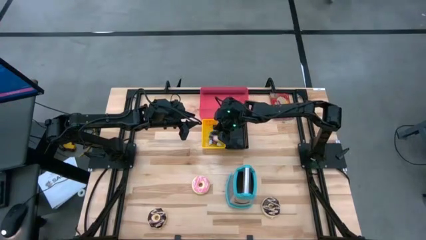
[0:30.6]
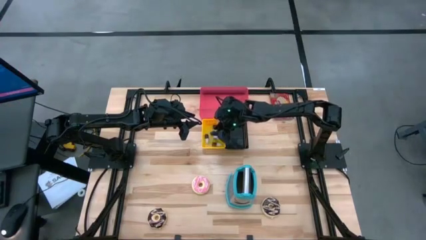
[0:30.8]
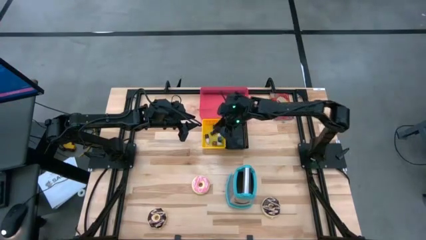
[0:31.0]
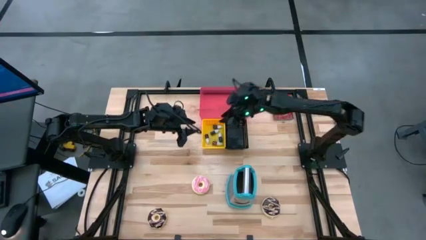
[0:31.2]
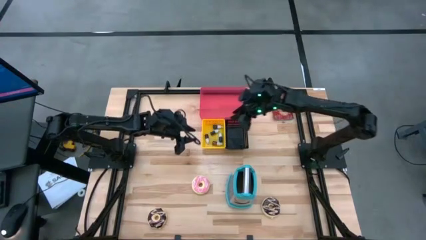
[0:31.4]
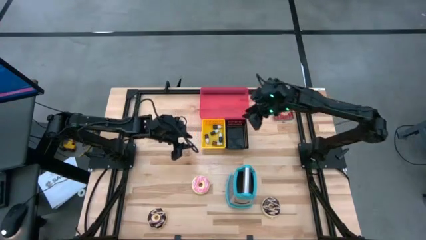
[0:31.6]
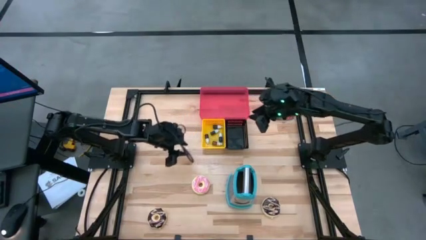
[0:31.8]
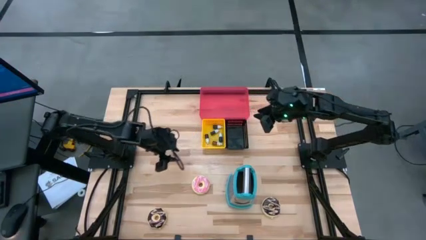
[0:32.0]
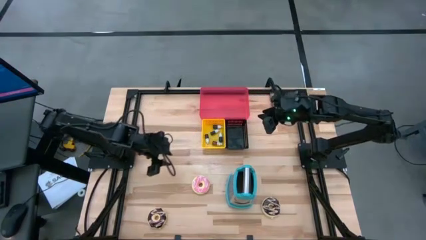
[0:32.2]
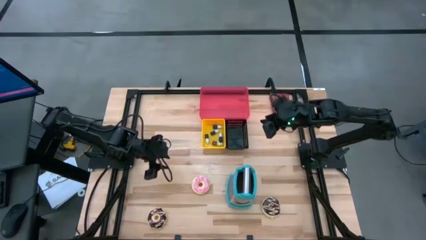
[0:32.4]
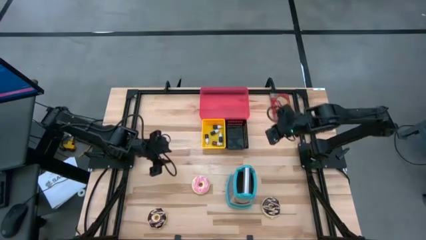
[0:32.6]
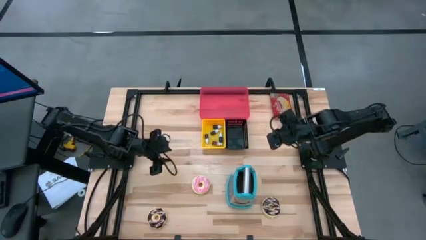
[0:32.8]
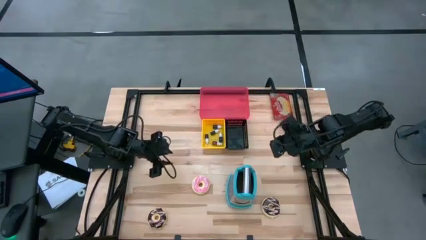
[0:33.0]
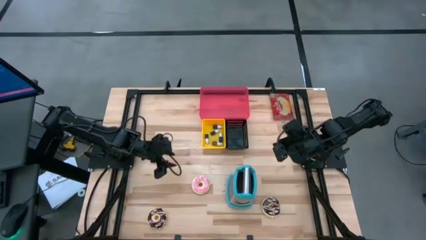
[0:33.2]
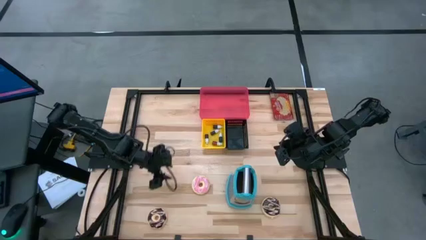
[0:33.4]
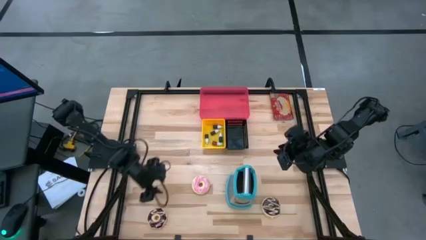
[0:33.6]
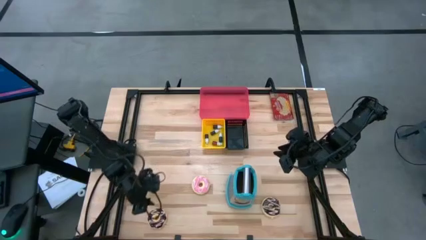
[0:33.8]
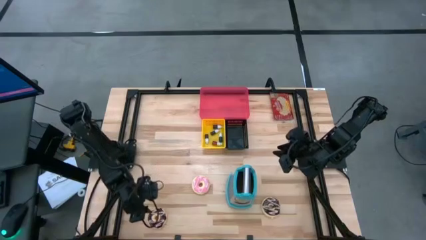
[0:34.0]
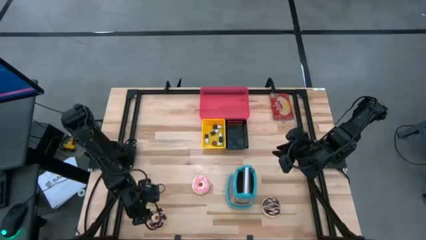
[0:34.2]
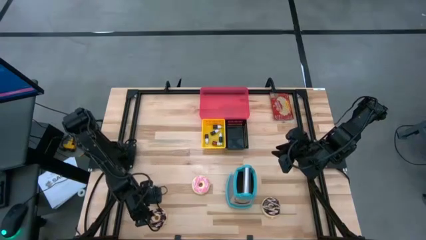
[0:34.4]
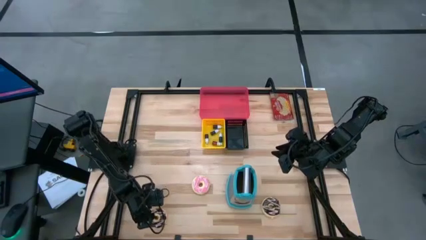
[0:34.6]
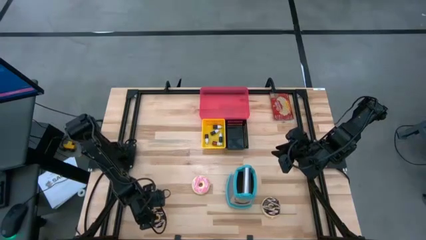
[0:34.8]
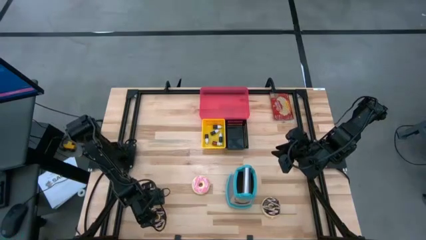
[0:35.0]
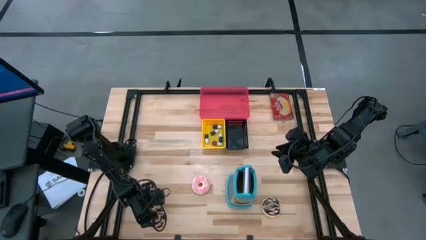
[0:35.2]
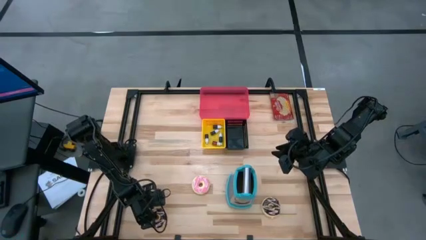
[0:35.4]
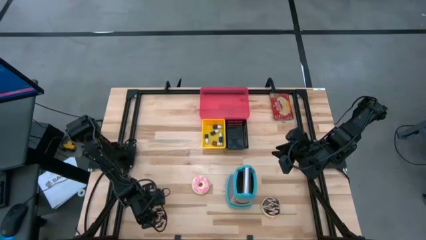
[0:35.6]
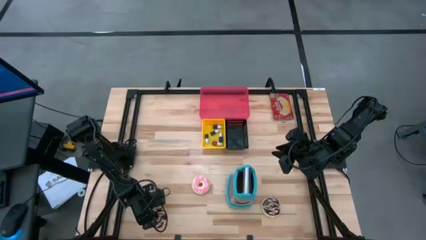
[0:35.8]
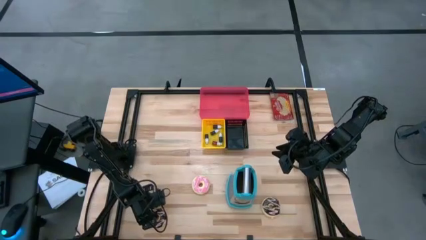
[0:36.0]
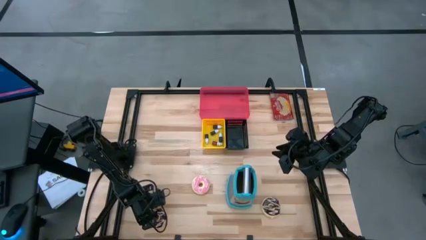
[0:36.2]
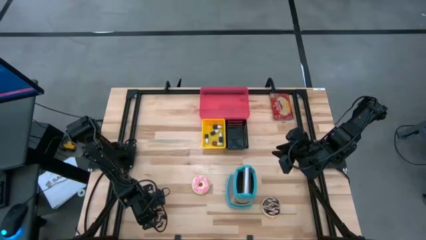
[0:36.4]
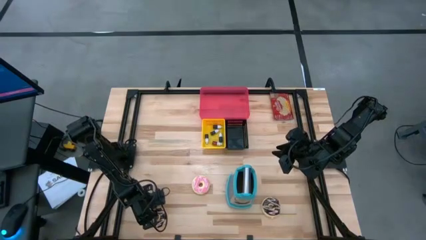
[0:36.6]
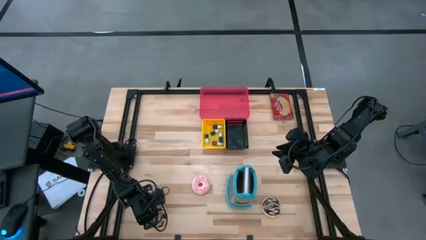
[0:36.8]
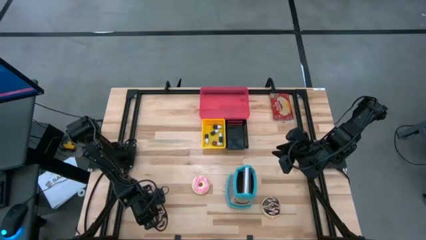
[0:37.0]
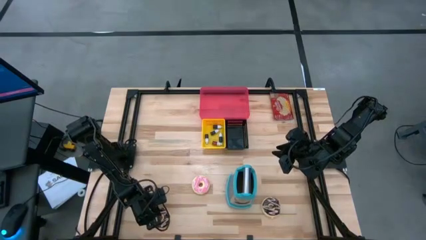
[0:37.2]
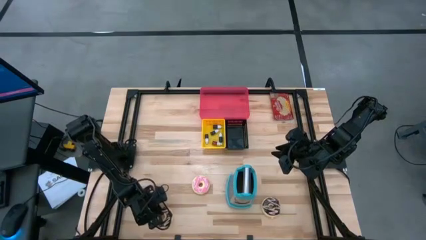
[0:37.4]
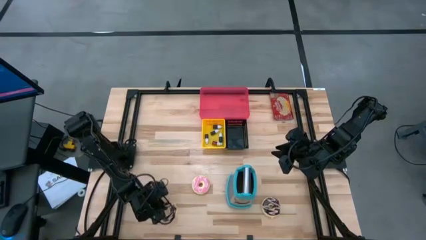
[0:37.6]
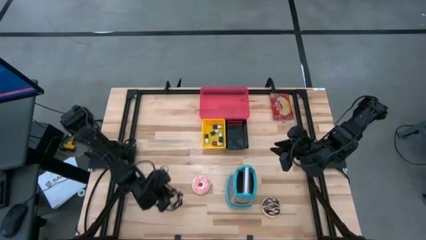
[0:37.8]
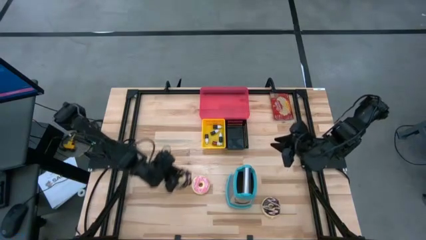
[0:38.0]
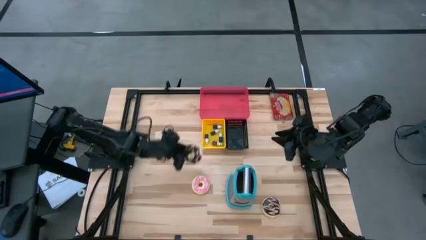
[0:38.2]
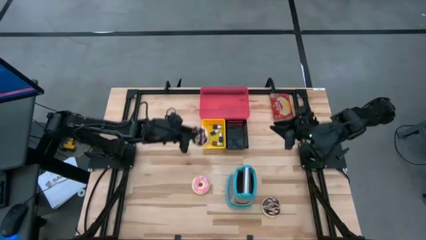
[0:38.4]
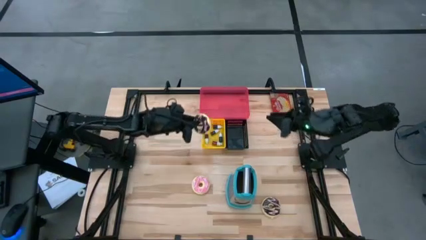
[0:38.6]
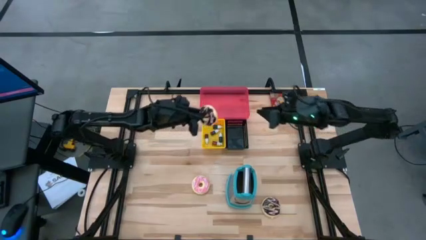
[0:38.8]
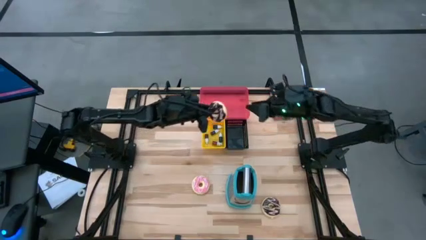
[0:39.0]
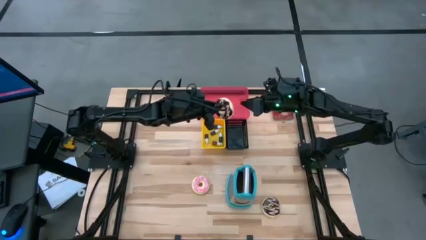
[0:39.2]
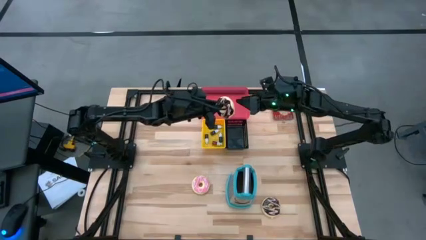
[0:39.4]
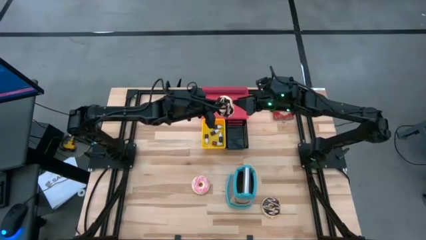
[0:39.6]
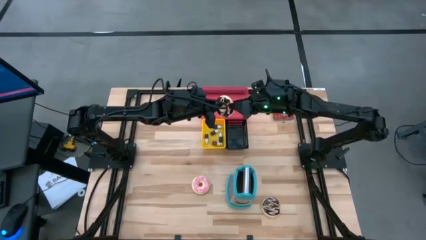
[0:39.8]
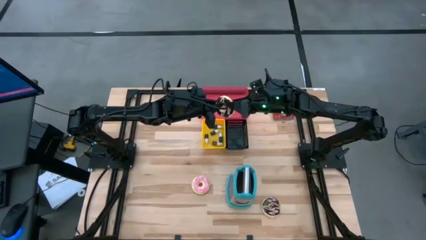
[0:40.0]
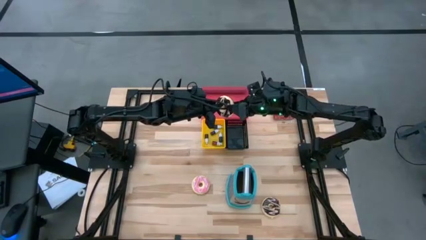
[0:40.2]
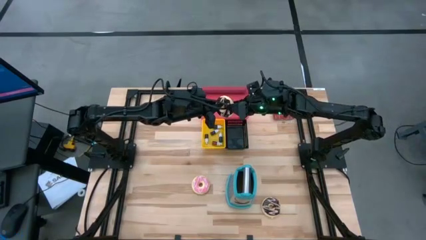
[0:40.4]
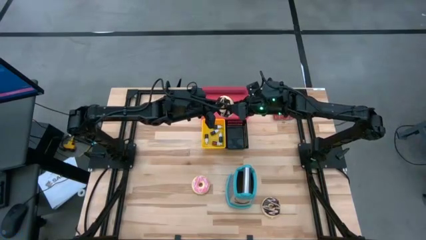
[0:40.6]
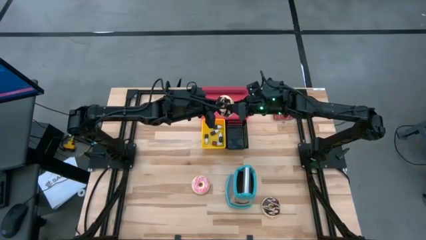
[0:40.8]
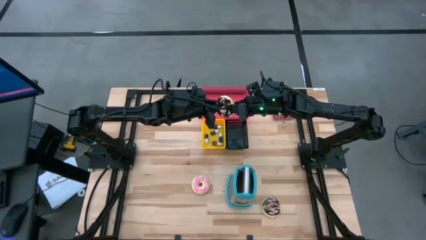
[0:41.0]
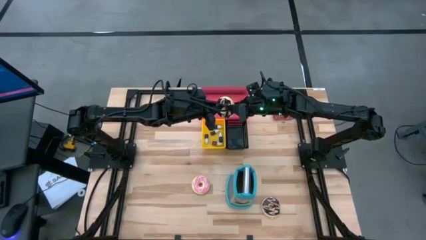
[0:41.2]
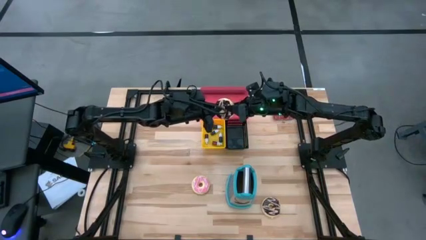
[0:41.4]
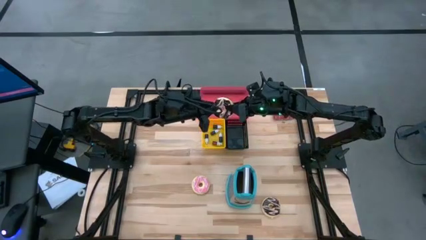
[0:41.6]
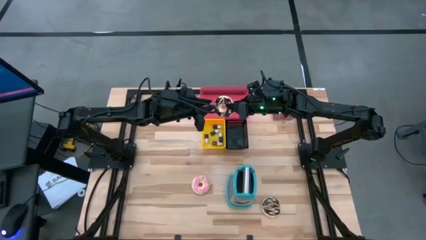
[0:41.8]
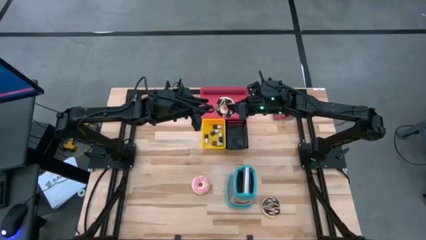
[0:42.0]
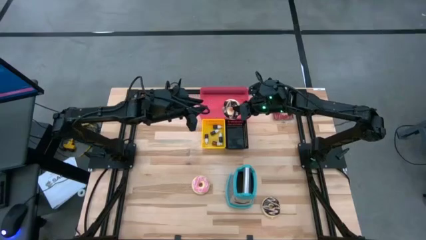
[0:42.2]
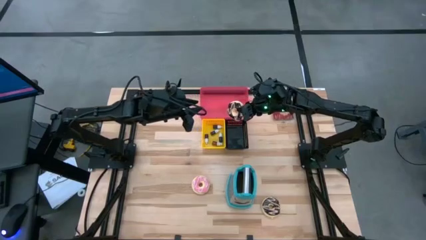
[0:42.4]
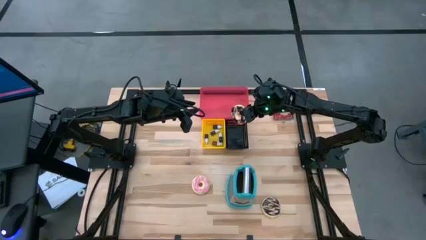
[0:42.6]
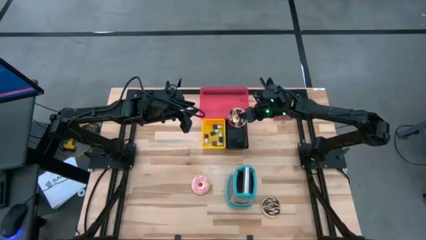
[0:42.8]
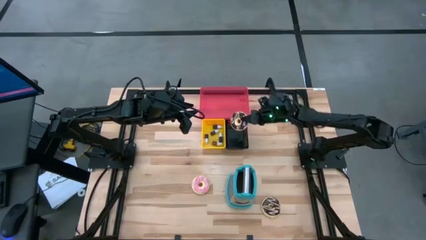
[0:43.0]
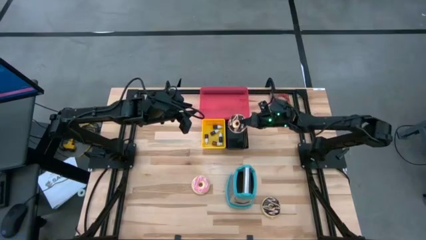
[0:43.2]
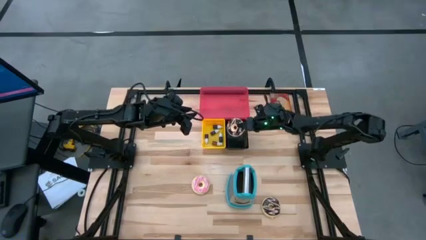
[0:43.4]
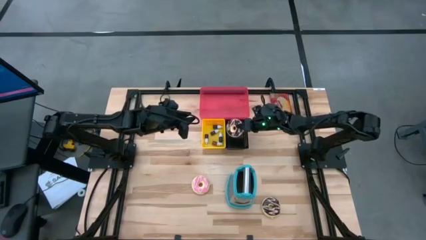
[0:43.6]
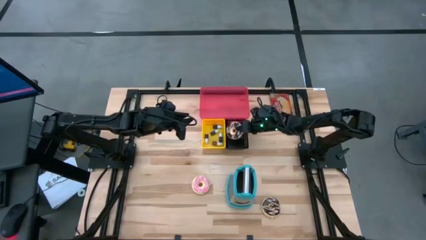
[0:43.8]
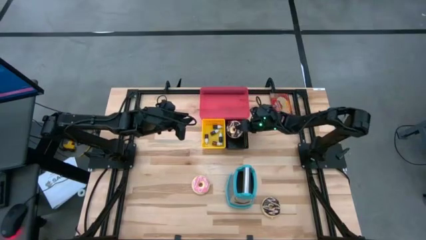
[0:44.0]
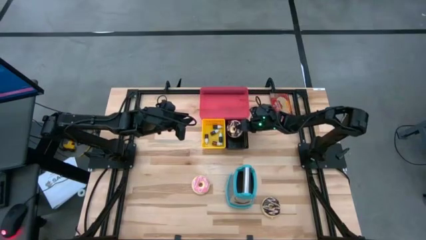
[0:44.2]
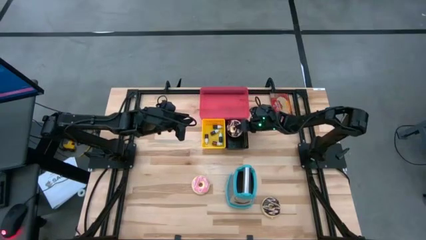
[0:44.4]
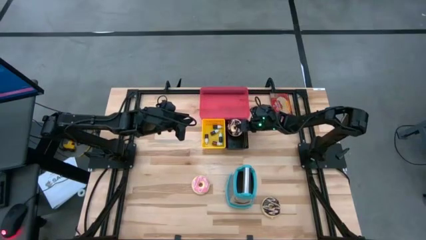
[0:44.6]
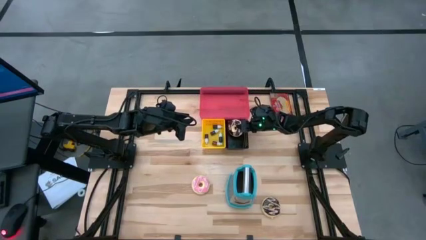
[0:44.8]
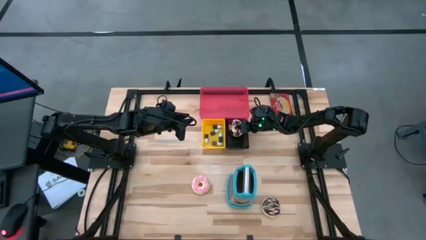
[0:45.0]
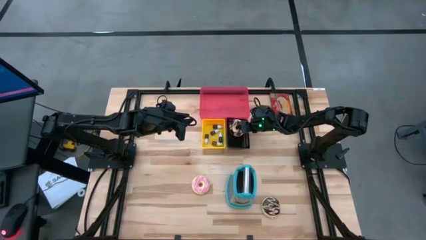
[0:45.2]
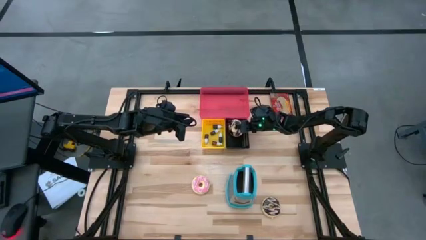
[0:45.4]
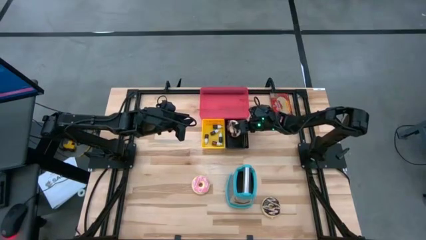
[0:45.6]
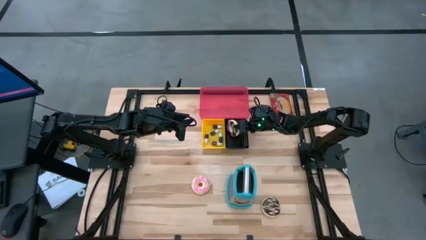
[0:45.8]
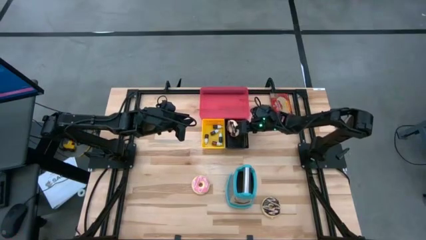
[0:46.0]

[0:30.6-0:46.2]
Put the left black donut into the black bin
